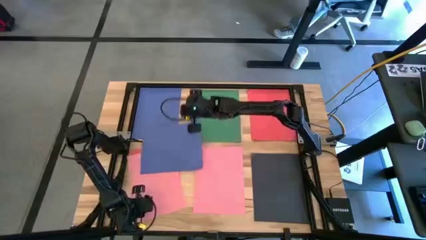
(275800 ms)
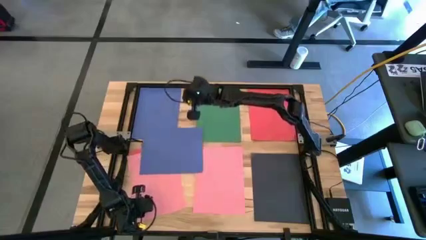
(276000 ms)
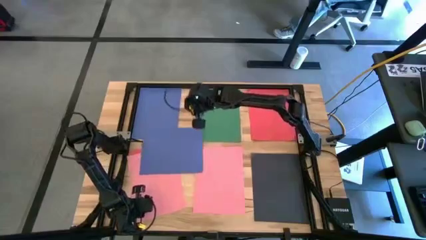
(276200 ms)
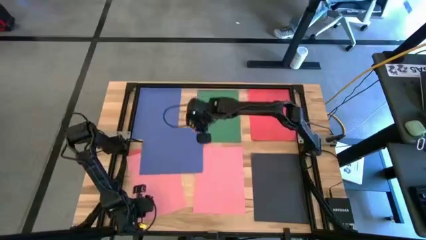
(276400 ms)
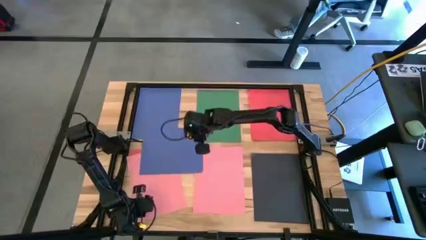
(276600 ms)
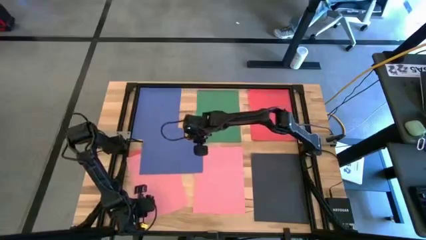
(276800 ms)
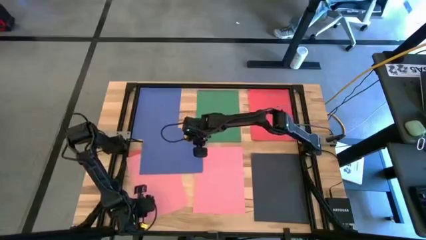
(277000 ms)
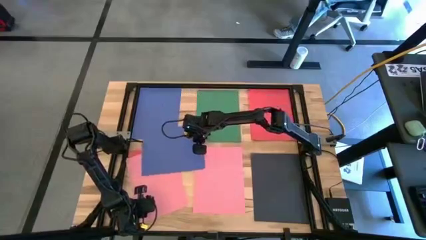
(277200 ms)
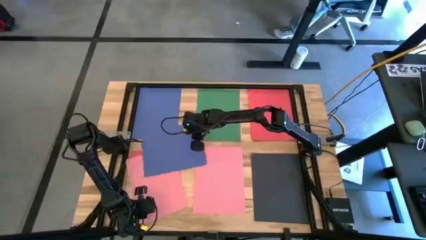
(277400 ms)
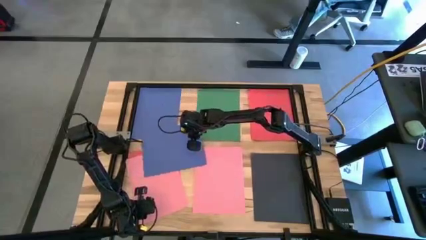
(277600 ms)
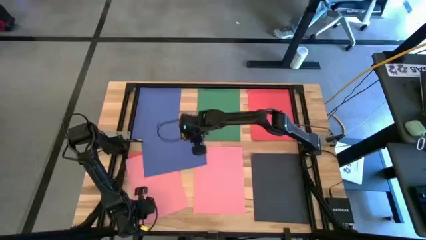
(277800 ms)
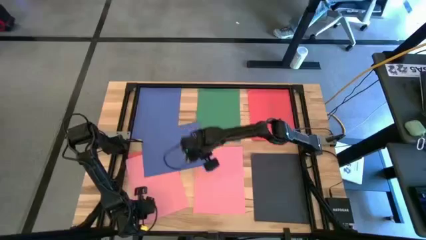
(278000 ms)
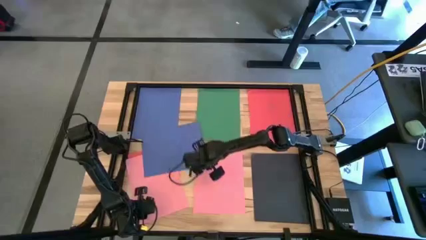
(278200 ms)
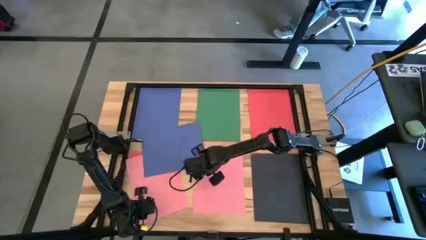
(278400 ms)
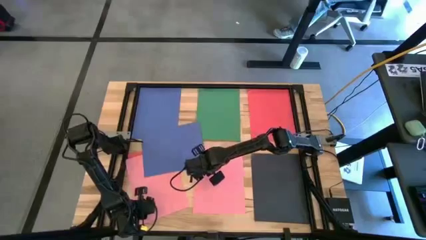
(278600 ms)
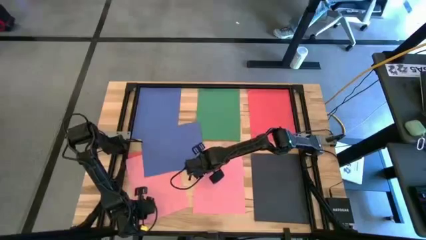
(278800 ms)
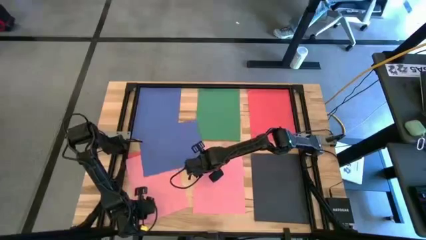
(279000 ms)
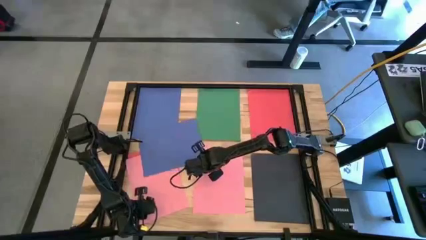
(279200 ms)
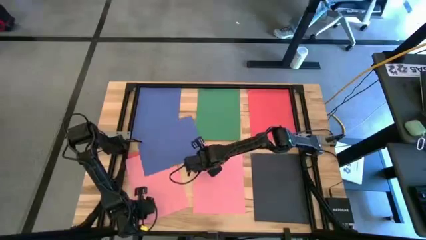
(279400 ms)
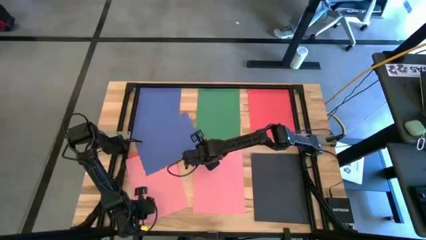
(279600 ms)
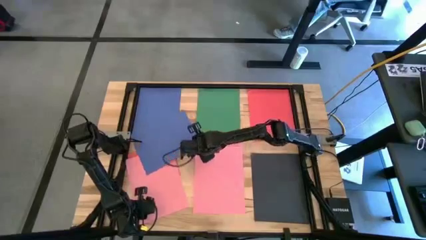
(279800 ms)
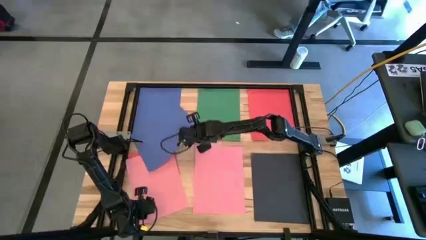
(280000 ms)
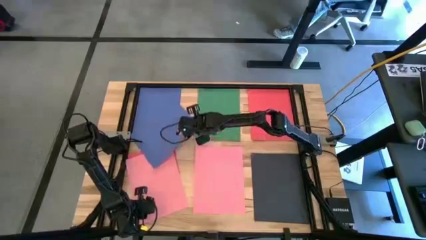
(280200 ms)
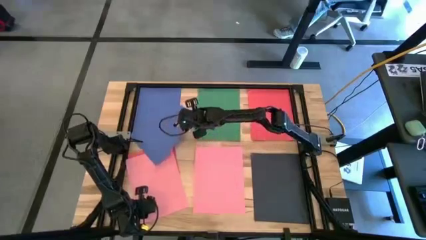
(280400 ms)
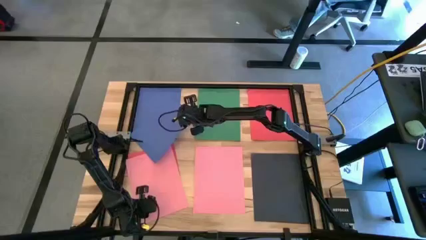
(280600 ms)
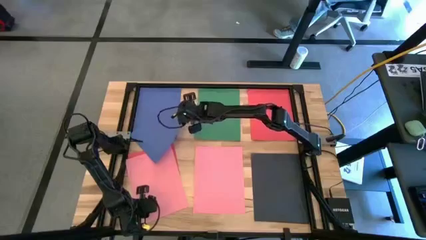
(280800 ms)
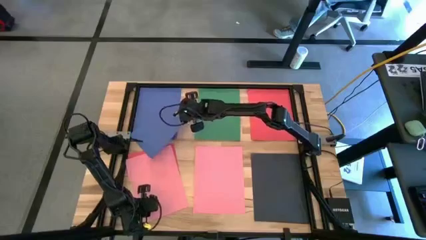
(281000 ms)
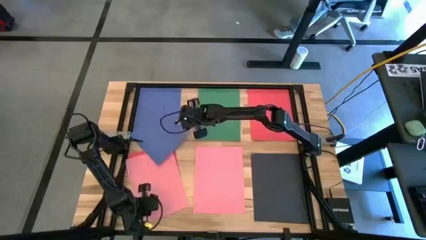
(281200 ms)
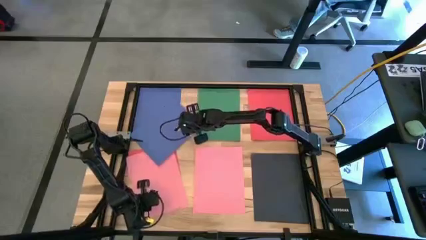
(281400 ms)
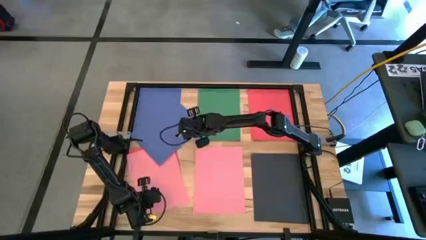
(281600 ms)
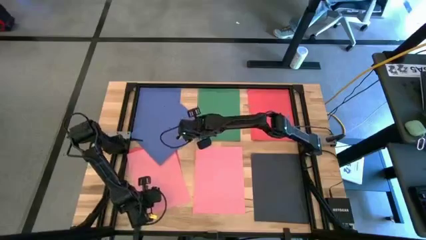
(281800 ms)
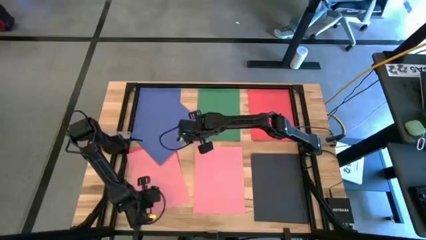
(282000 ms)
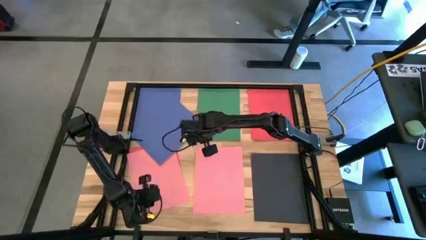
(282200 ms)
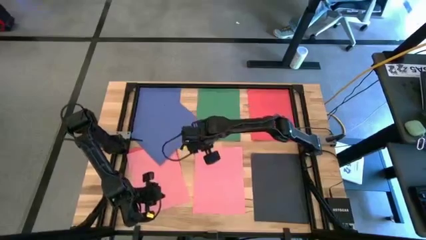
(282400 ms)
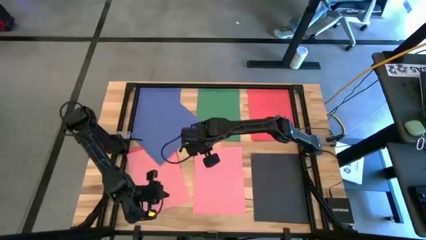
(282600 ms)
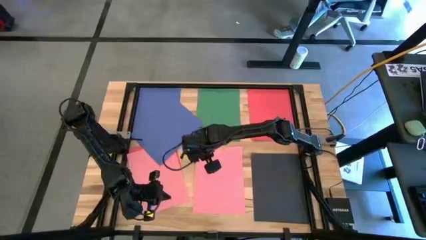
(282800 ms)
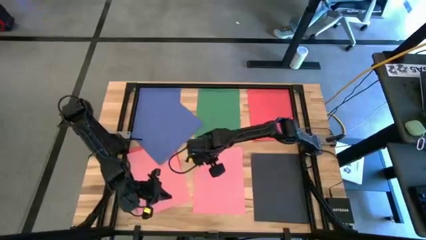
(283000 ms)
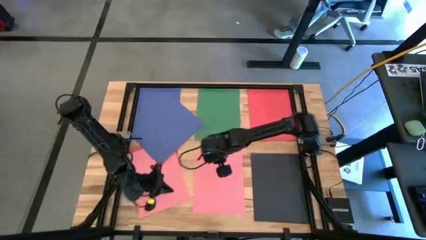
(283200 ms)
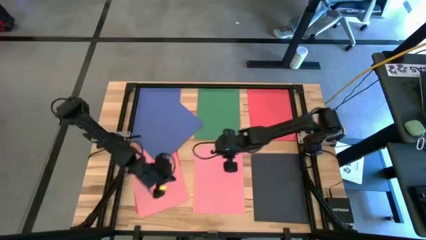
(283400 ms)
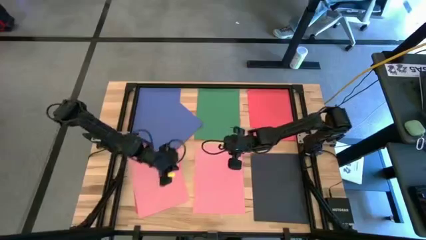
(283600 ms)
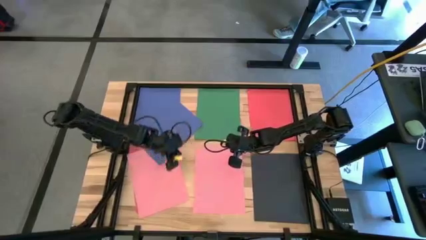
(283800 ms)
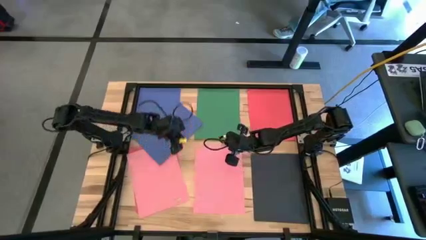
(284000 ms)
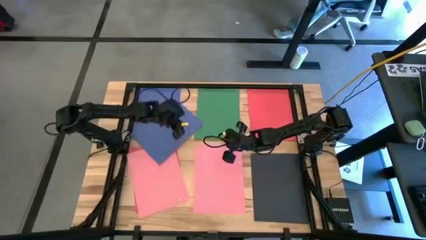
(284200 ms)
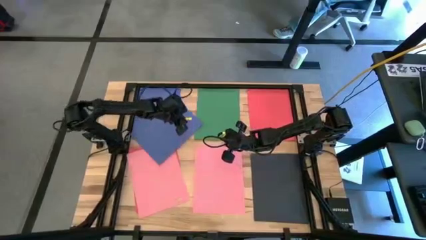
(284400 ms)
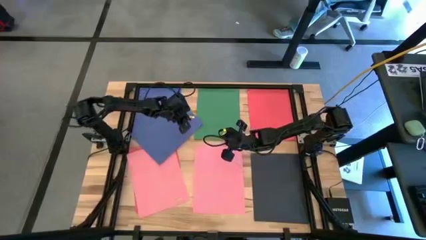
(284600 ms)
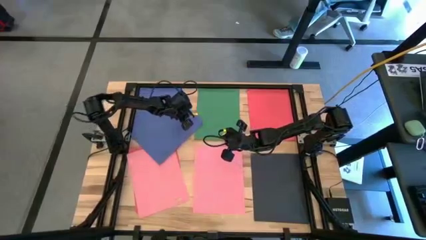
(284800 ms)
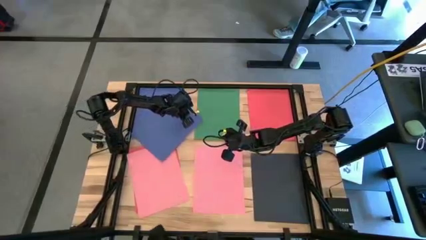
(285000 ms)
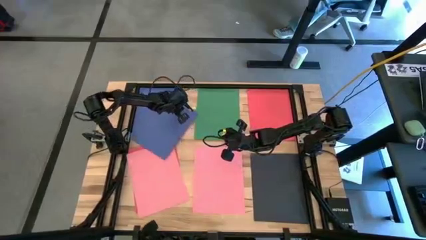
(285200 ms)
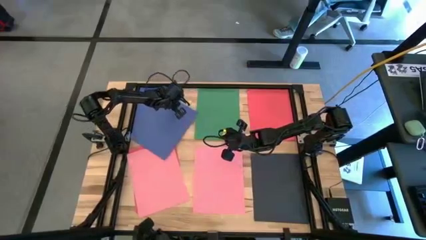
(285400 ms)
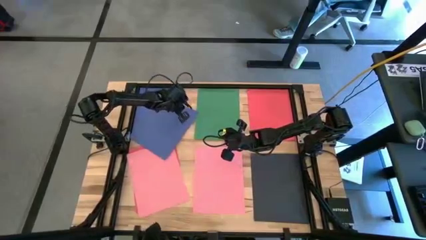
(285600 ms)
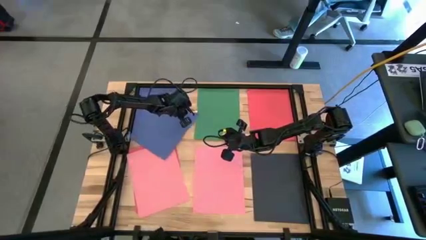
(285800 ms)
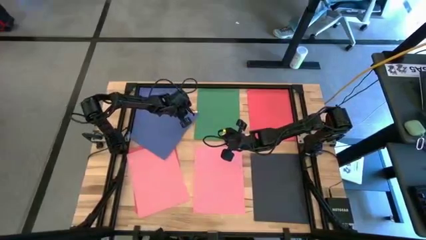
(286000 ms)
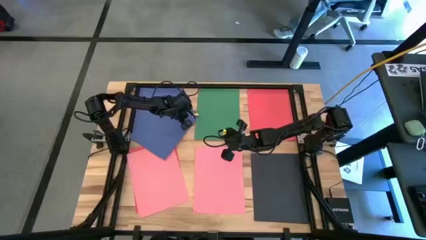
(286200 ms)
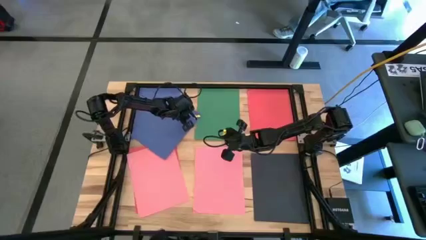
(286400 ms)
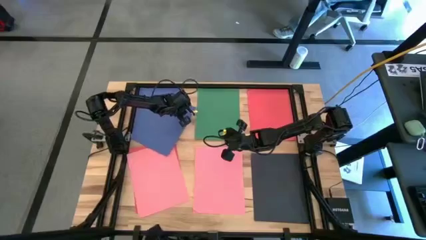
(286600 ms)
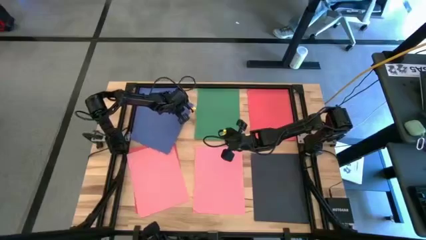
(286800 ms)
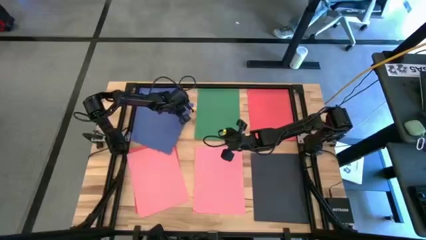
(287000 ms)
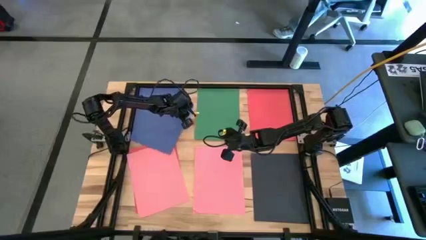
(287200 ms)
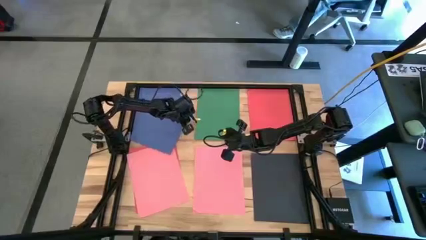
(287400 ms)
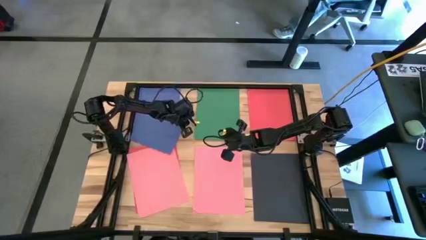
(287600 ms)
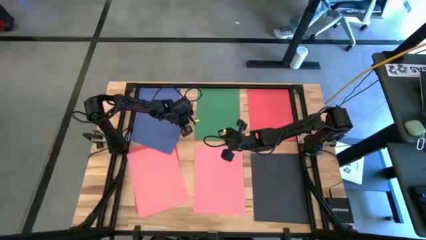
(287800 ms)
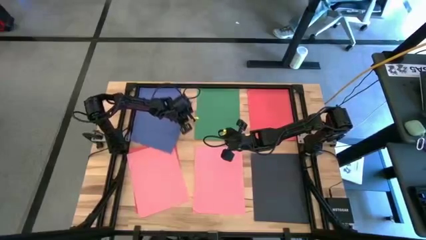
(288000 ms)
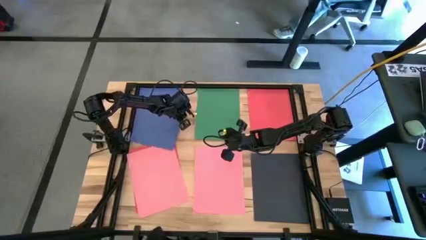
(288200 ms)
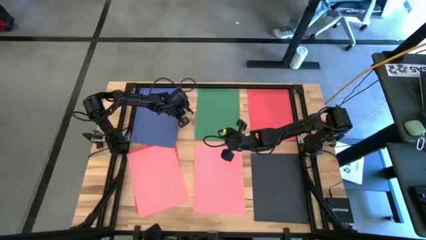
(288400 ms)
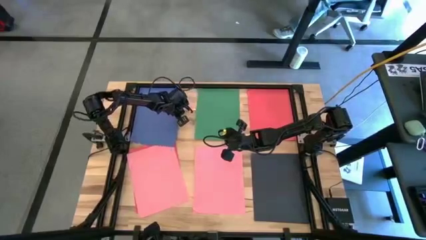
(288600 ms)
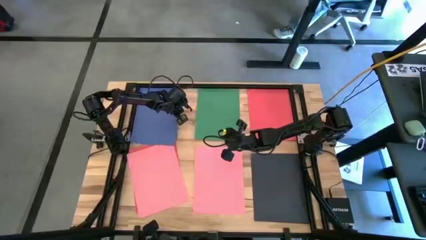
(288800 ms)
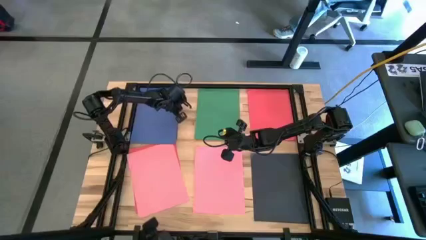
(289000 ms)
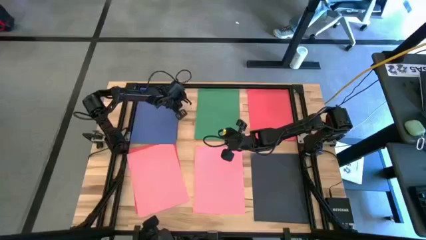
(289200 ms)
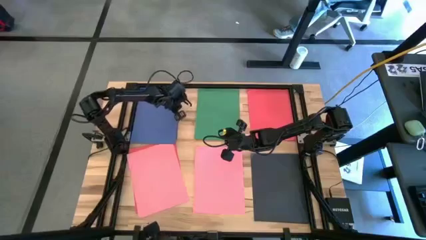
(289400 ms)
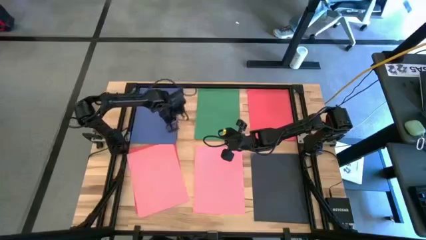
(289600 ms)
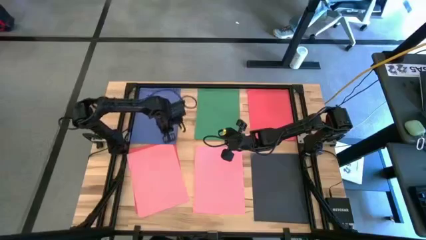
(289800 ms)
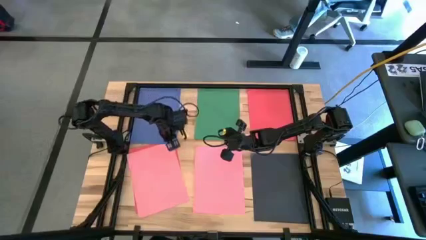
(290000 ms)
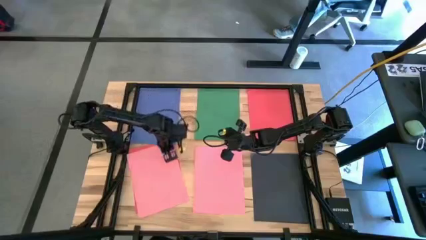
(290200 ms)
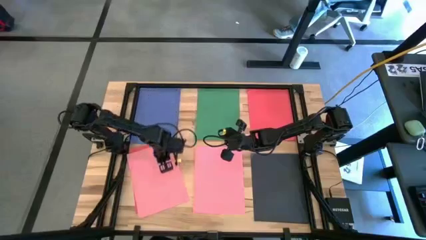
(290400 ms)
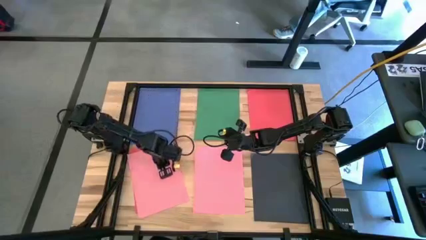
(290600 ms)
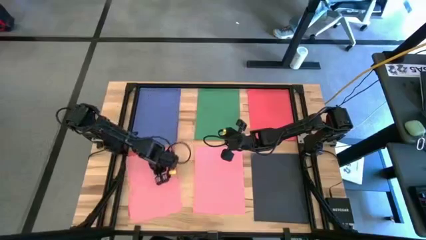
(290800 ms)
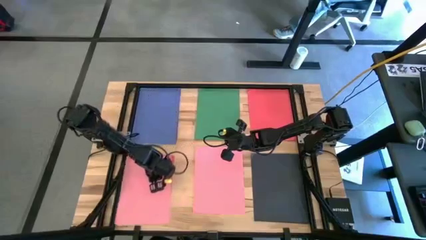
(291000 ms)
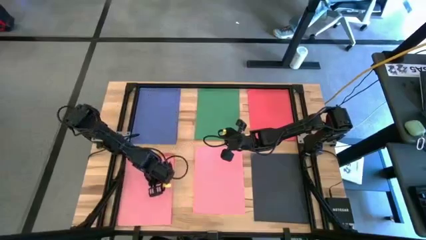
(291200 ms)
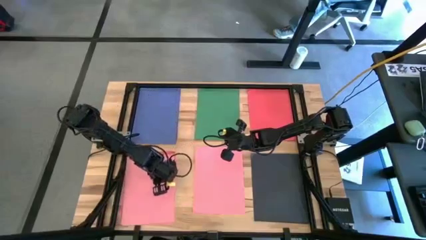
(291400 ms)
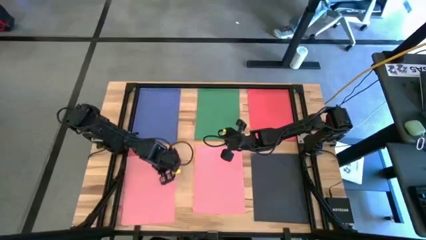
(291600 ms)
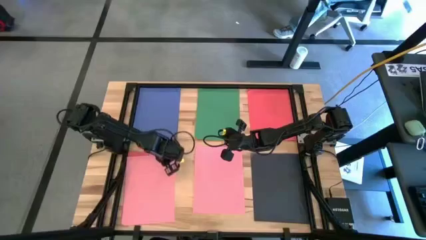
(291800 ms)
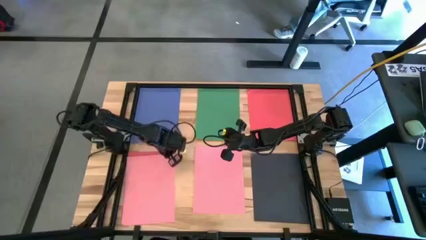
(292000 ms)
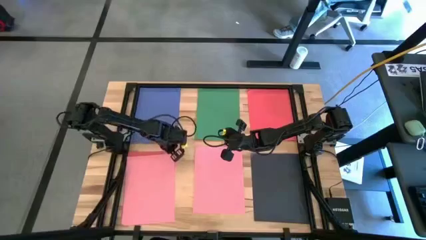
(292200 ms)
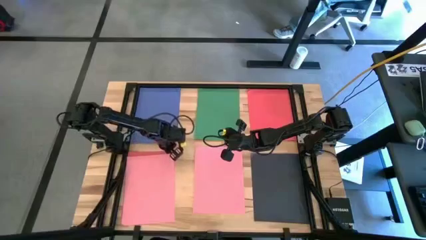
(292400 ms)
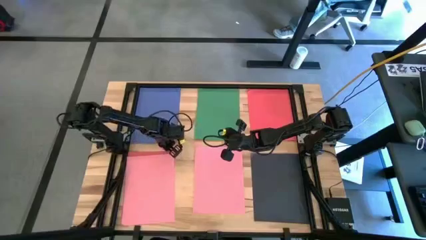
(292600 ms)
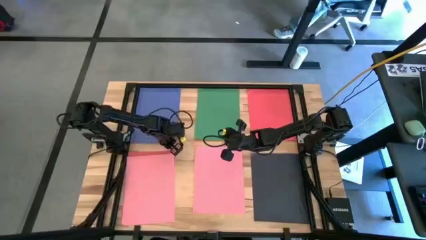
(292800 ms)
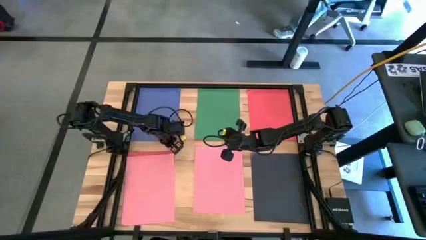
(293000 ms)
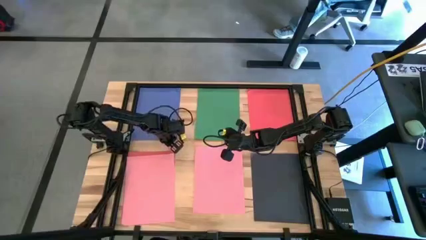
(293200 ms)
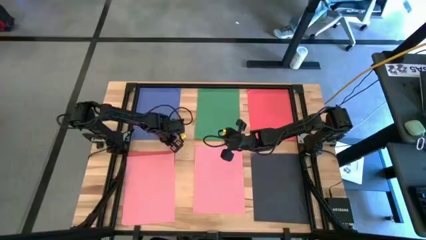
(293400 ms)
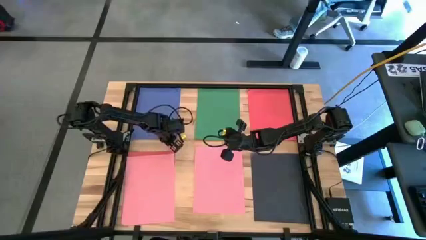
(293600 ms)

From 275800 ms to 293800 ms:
Task: Organize paper
Stack the blue paper on top of the other blue paper
